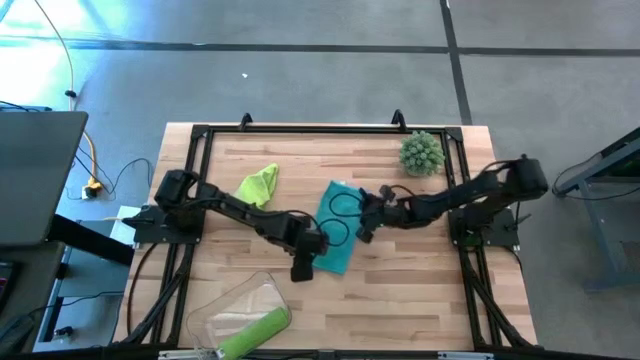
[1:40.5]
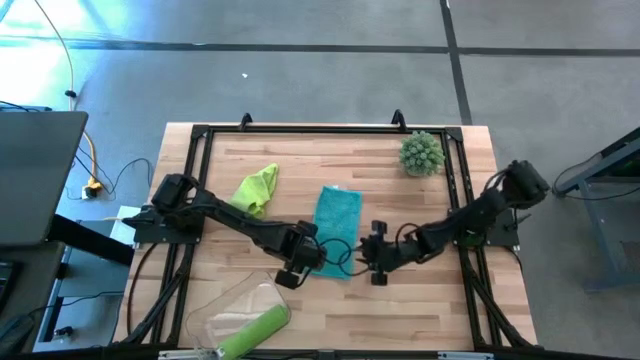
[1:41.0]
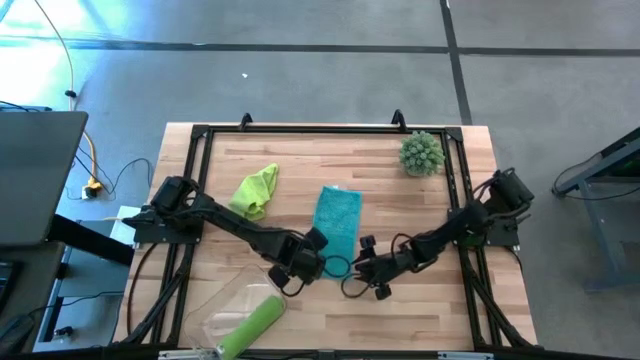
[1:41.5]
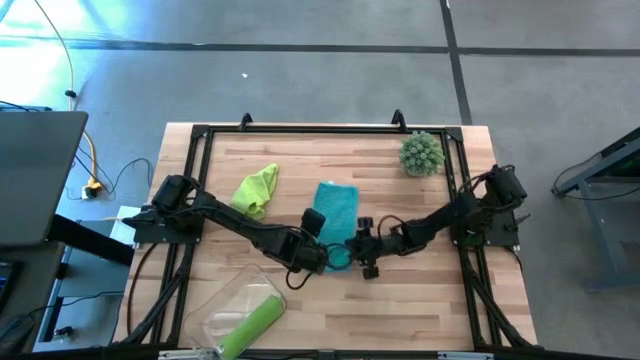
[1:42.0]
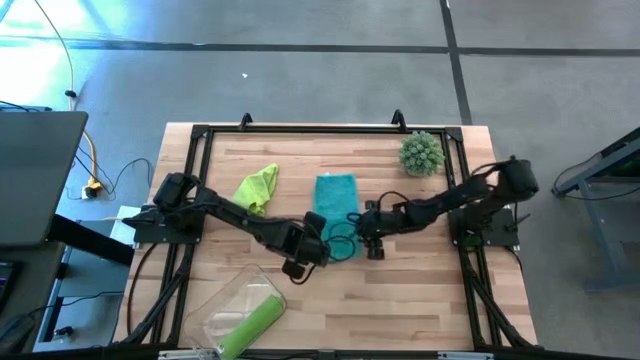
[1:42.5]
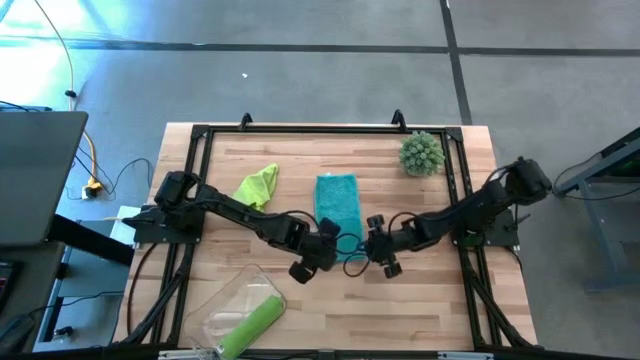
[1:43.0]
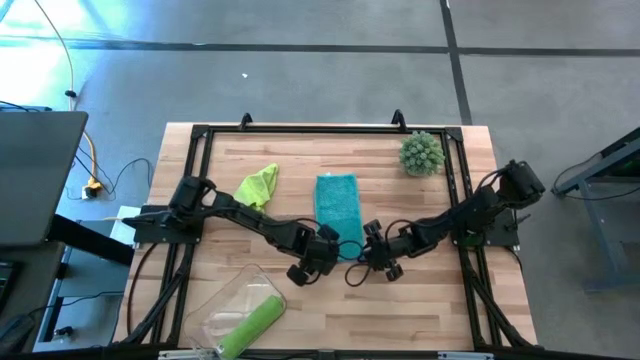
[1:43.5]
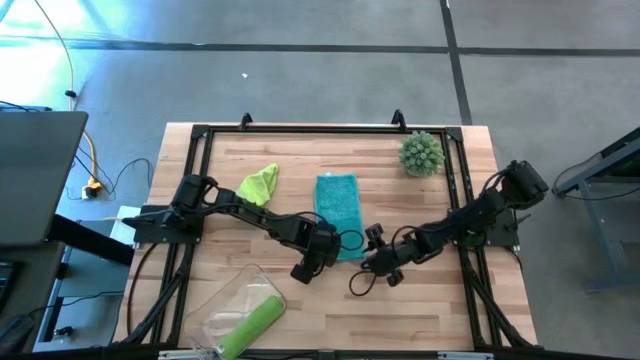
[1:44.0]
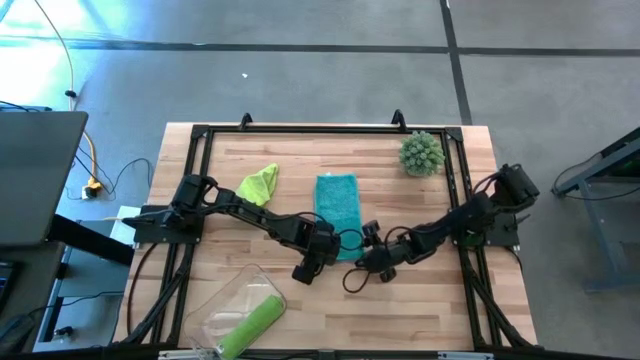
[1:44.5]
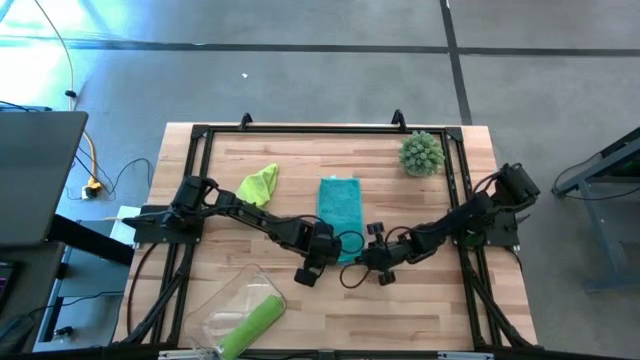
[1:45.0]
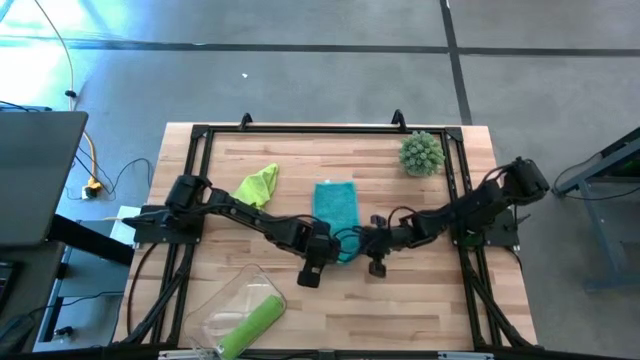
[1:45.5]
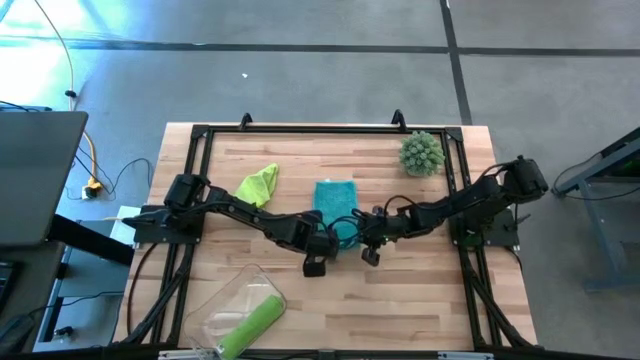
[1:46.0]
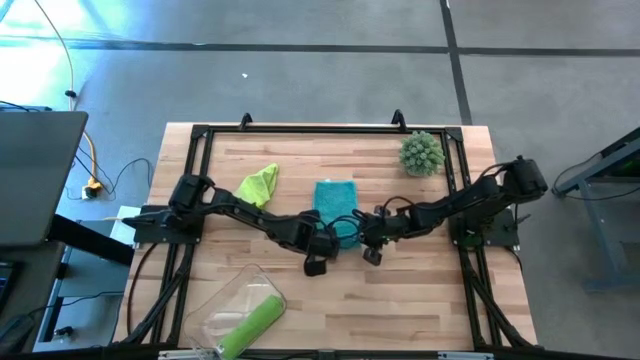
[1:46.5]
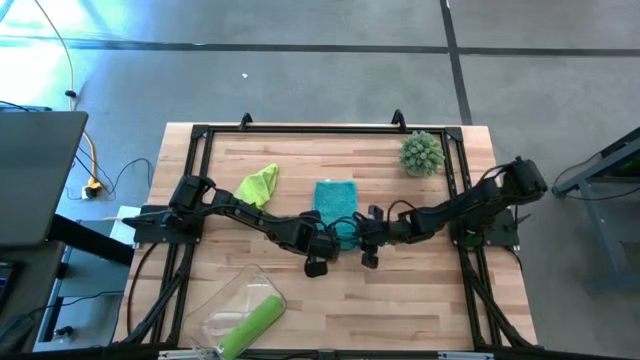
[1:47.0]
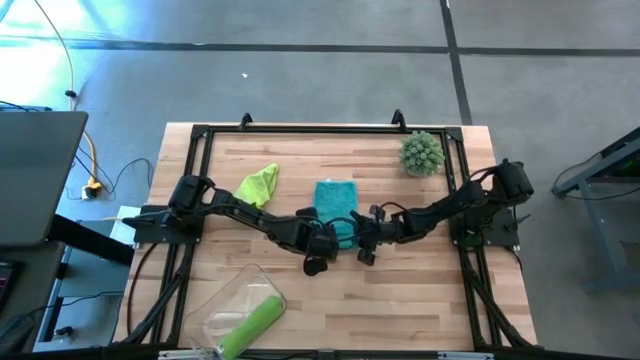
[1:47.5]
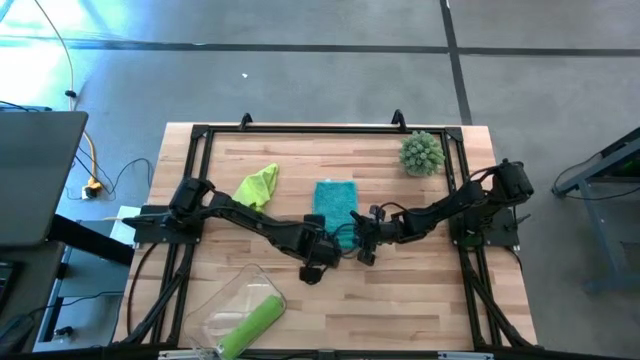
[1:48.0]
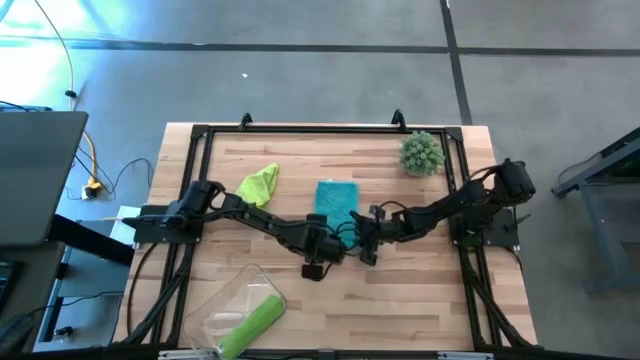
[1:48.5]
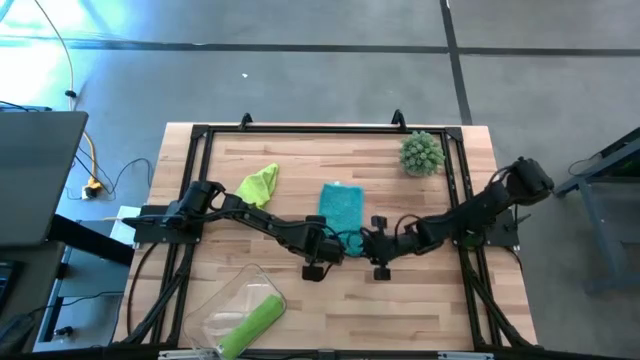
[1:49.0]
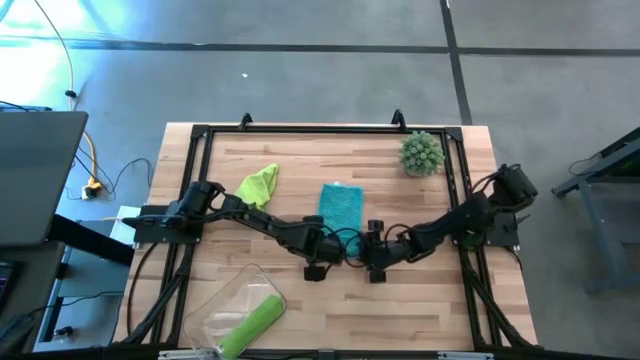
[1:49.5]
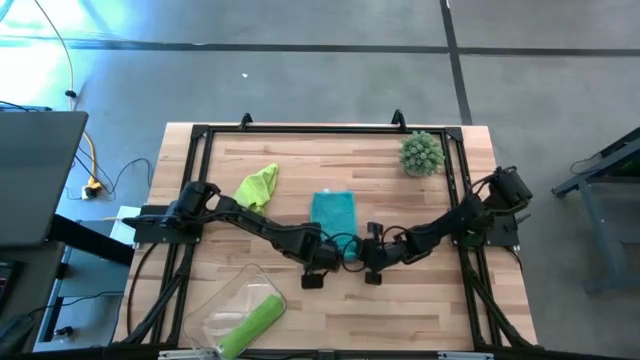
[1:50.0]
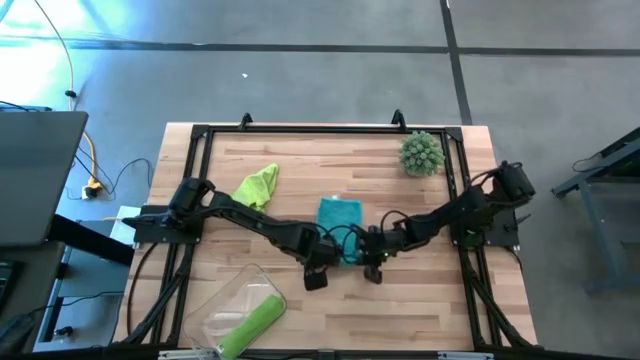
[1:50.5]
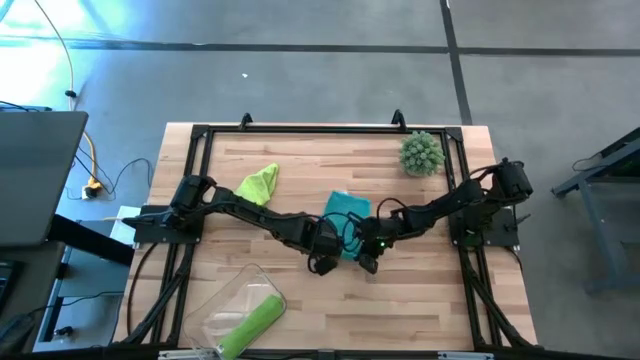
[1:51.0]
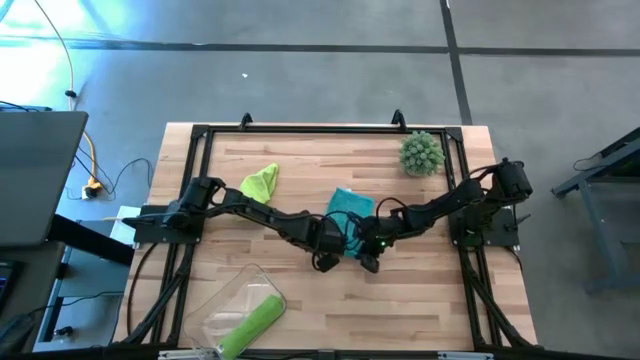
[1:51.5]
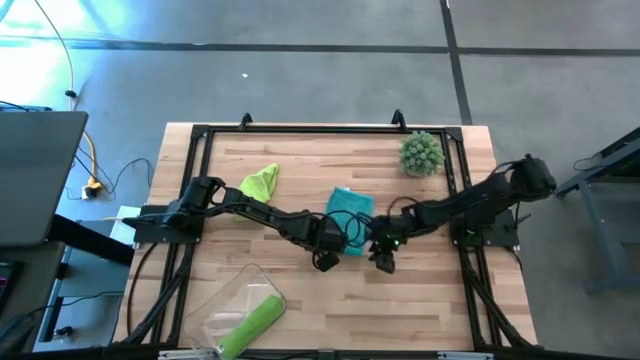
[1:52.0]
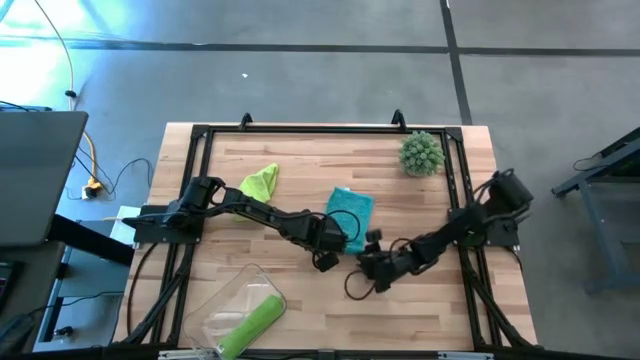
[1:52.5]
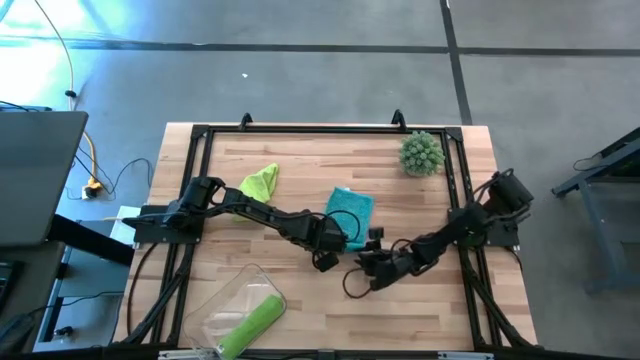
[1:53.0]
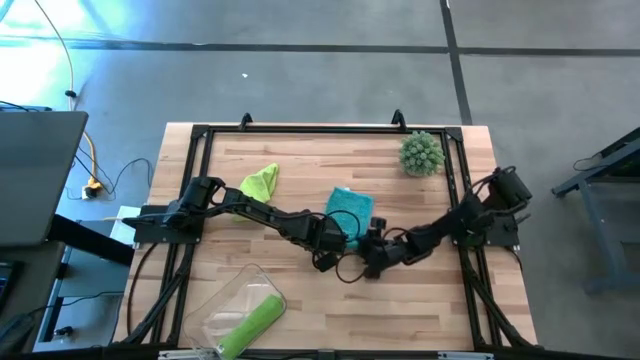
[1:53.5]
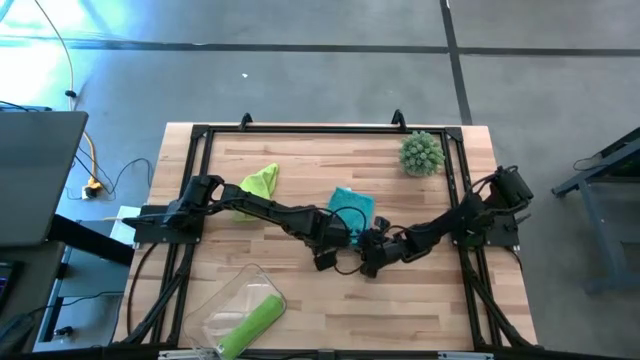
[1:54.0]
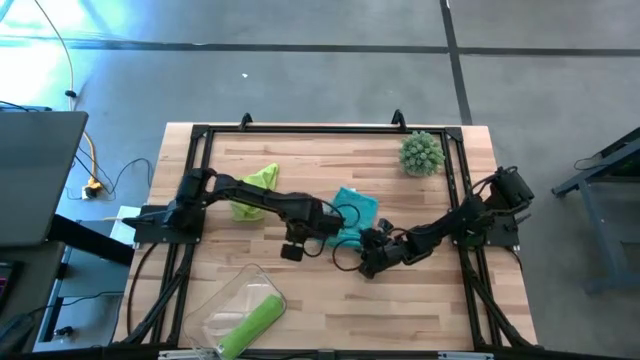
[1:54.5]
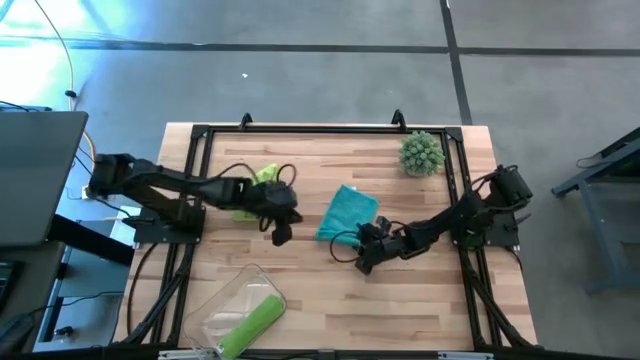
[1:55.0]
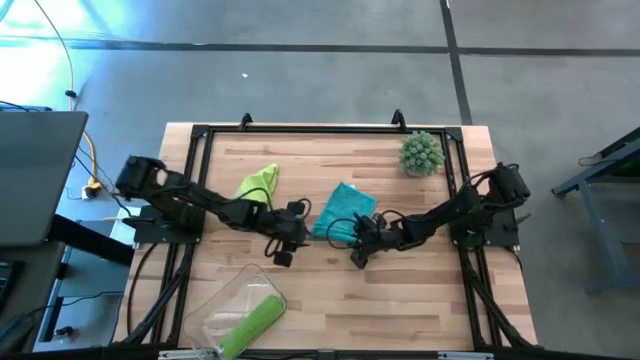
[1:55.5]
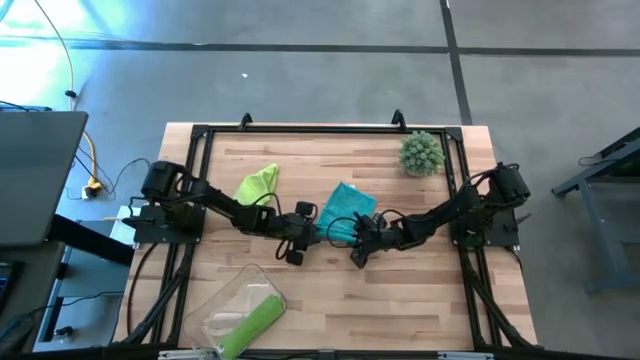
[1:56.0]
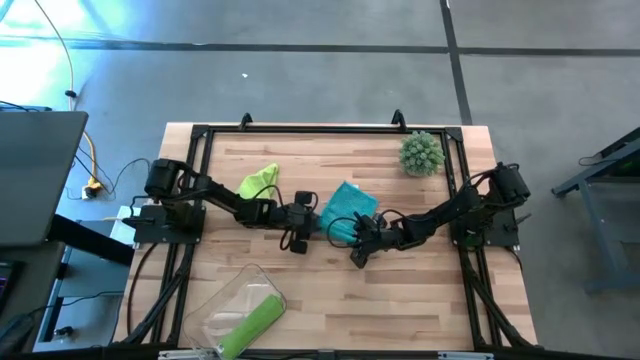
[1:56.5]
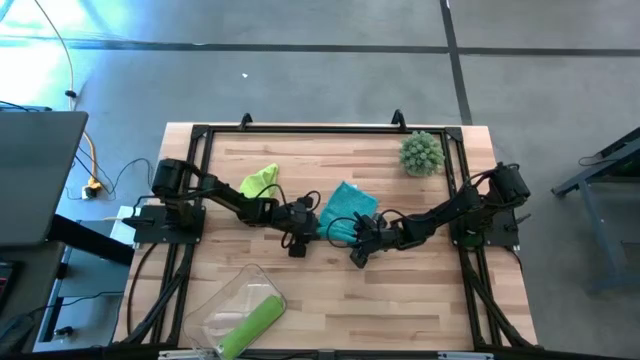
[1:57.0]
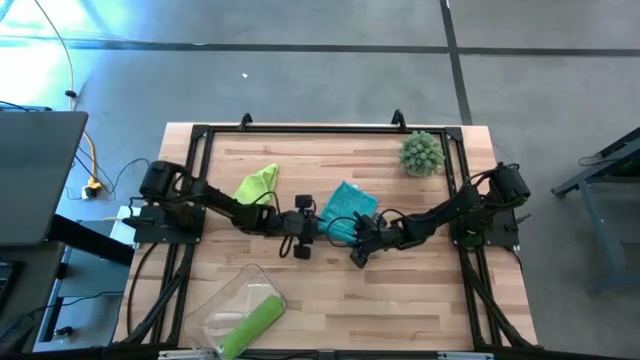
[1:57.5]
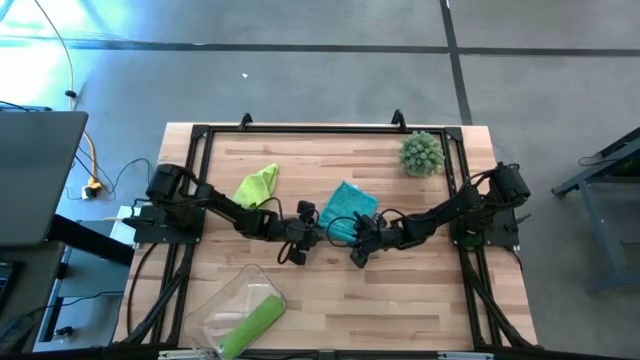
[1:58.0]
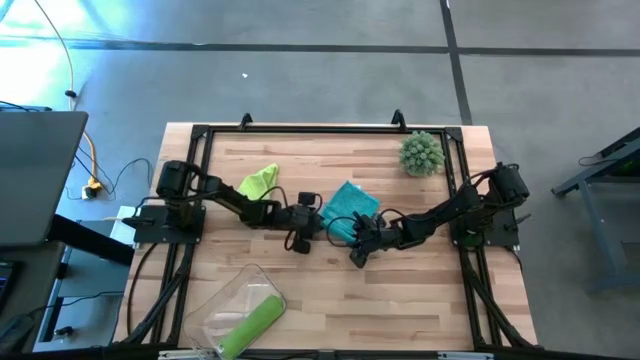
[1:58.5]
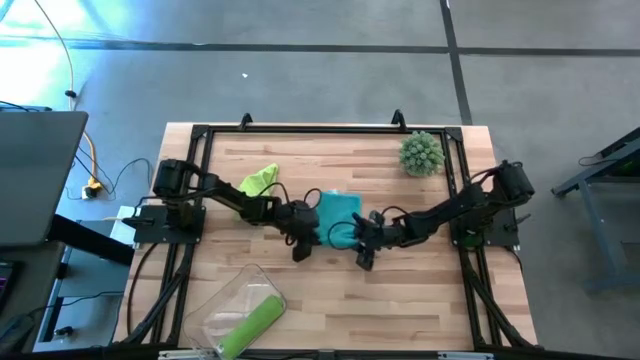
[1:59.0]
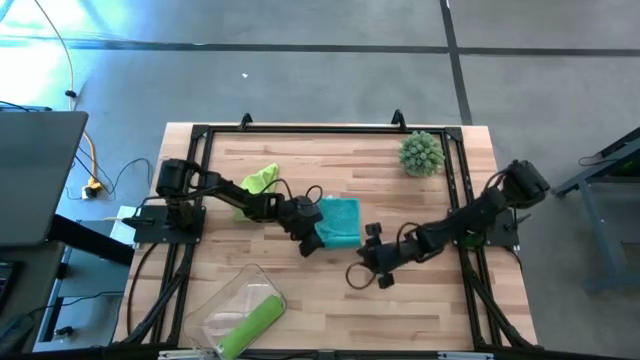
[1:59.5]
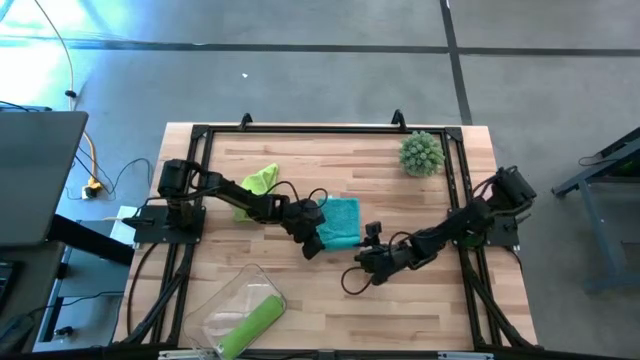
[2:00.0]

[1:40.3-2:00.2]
Task: Roll microfiber towels into tight, uniform cylinder then place into a basket
Roll the blue microfiber cloth
